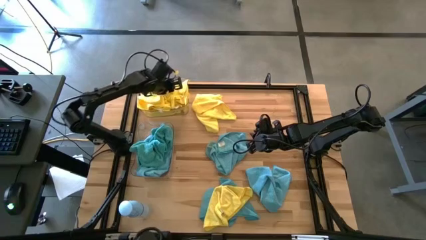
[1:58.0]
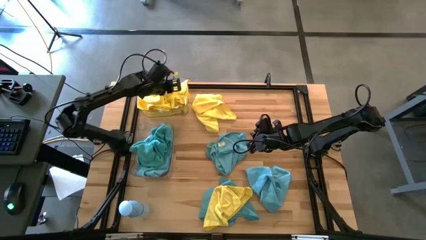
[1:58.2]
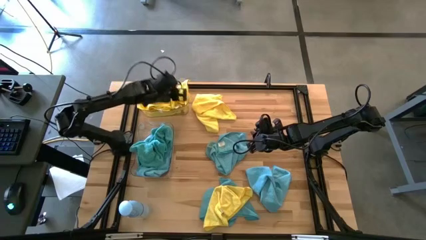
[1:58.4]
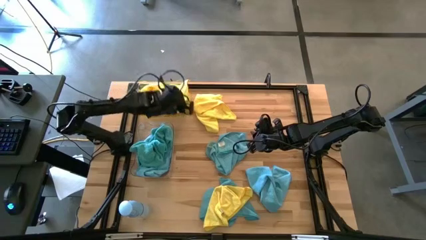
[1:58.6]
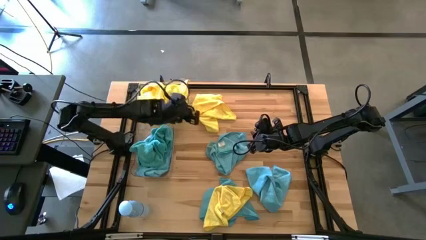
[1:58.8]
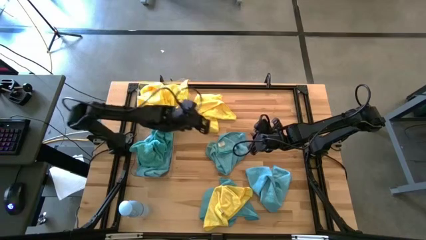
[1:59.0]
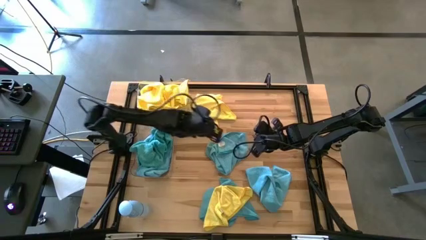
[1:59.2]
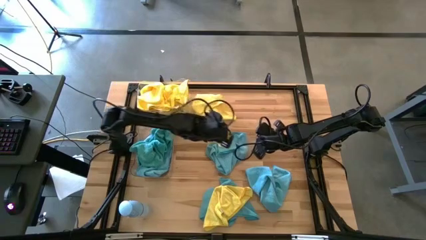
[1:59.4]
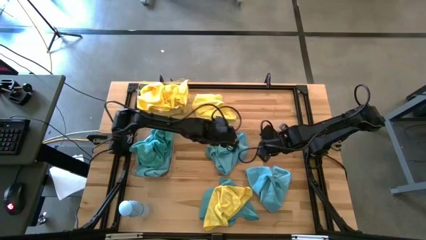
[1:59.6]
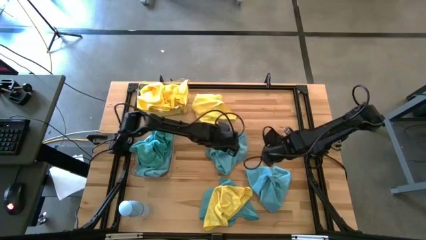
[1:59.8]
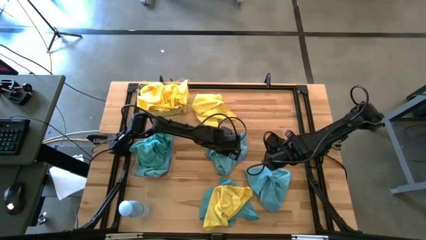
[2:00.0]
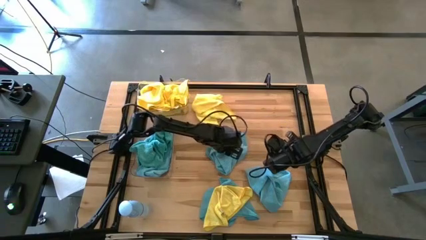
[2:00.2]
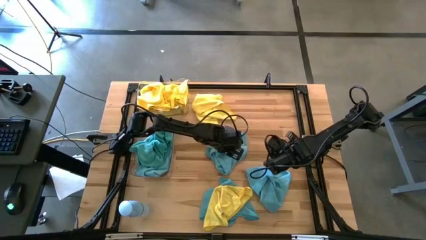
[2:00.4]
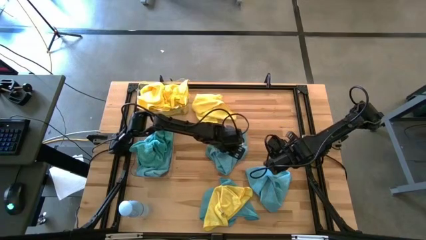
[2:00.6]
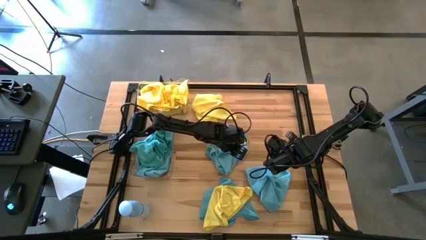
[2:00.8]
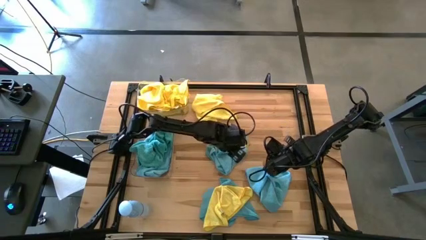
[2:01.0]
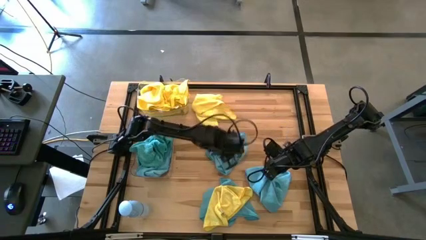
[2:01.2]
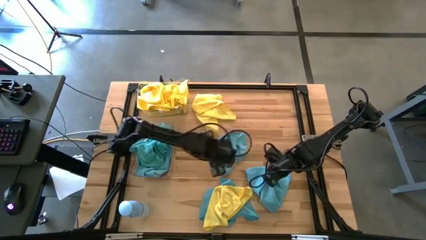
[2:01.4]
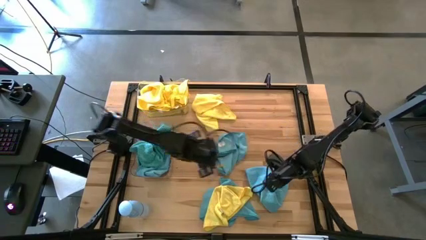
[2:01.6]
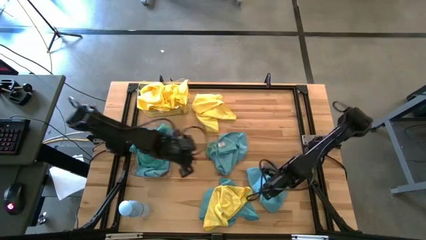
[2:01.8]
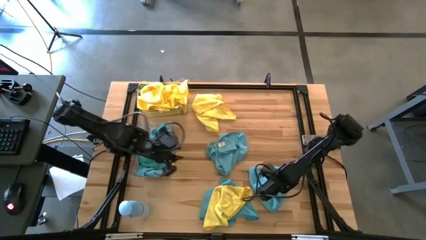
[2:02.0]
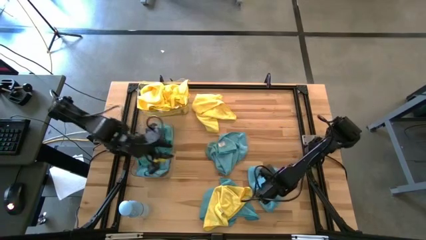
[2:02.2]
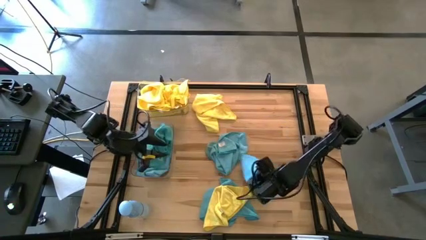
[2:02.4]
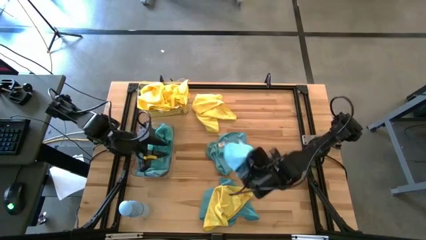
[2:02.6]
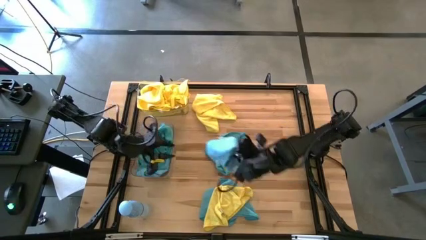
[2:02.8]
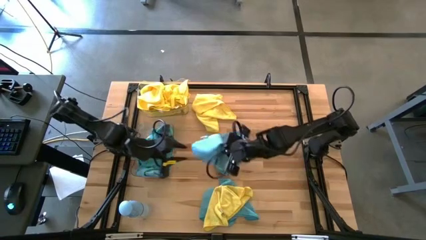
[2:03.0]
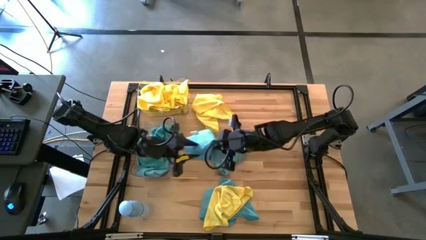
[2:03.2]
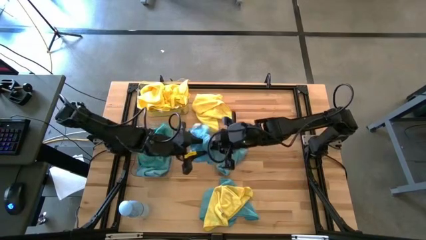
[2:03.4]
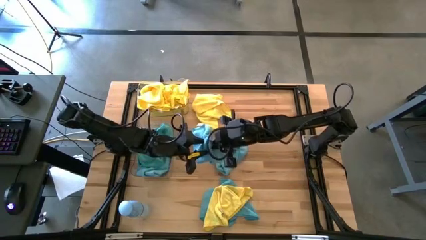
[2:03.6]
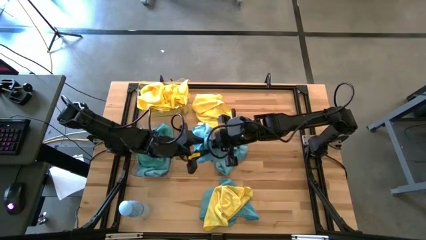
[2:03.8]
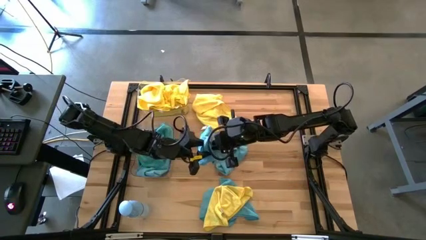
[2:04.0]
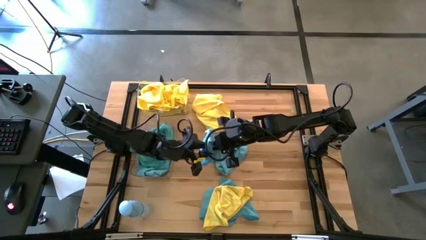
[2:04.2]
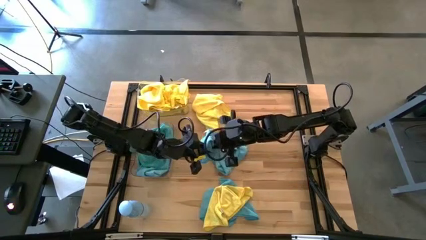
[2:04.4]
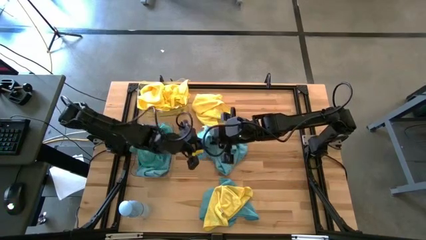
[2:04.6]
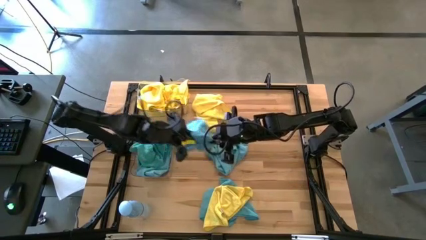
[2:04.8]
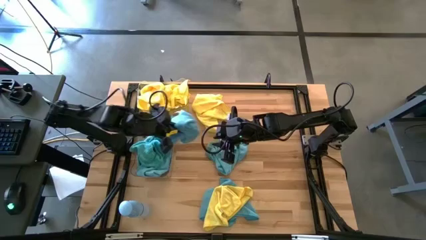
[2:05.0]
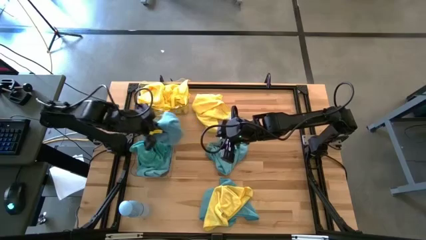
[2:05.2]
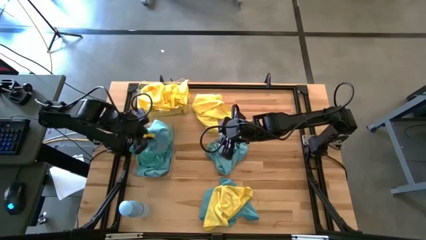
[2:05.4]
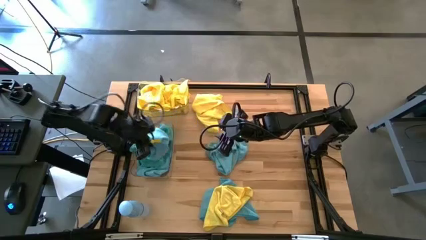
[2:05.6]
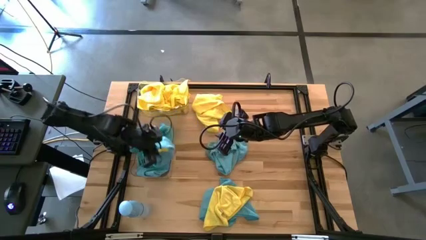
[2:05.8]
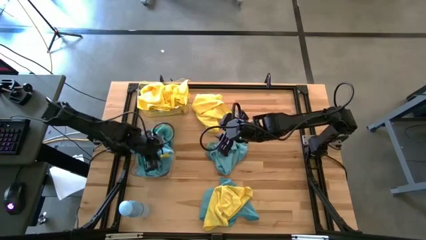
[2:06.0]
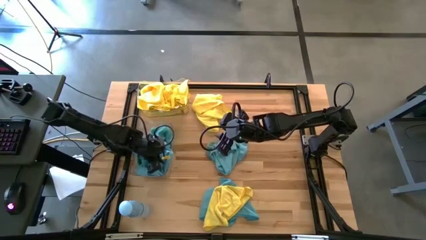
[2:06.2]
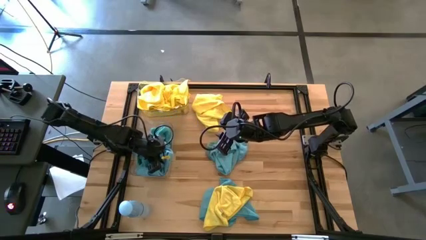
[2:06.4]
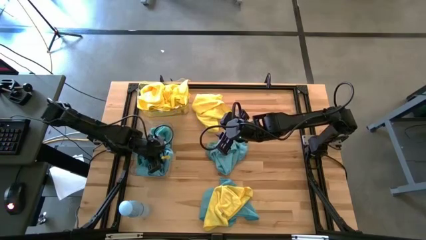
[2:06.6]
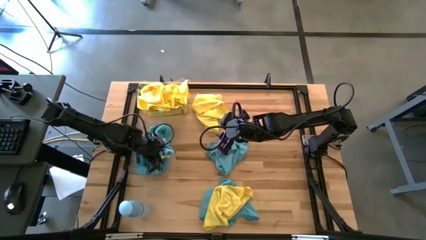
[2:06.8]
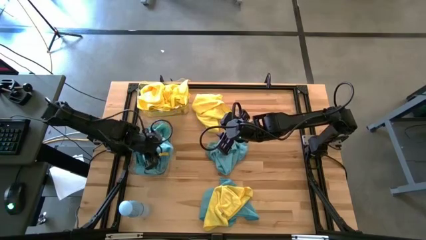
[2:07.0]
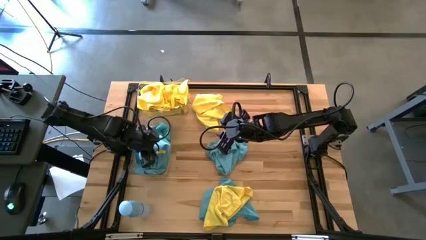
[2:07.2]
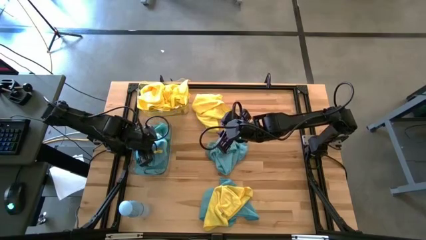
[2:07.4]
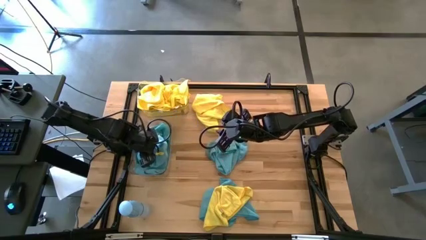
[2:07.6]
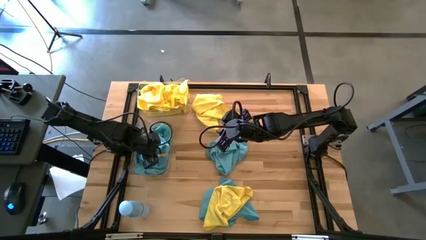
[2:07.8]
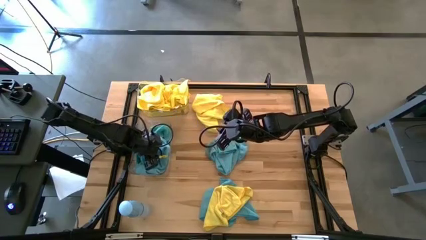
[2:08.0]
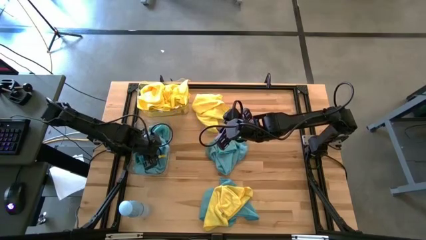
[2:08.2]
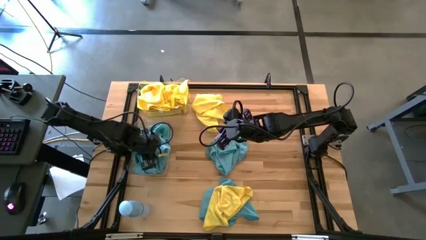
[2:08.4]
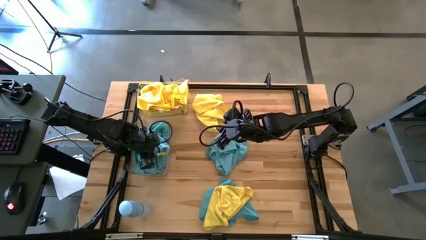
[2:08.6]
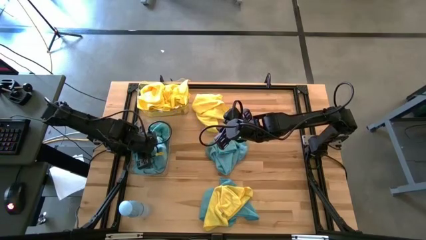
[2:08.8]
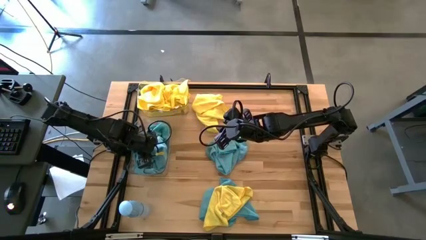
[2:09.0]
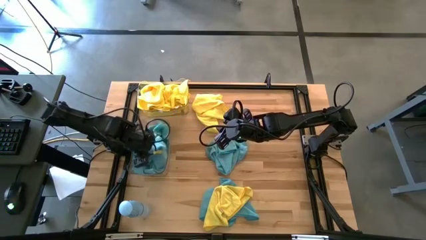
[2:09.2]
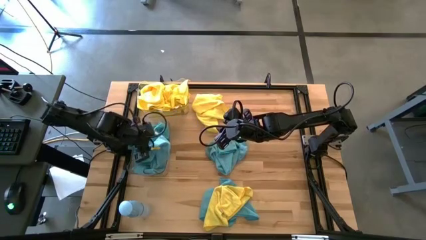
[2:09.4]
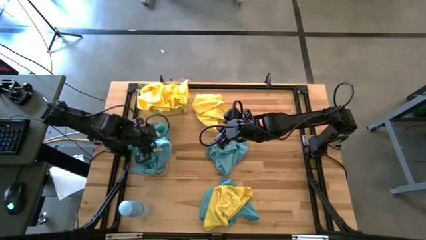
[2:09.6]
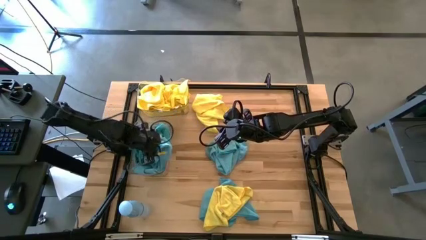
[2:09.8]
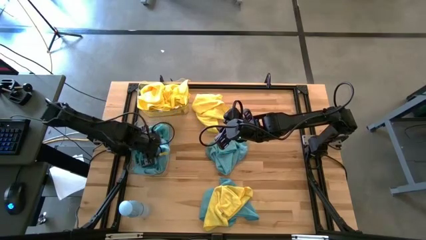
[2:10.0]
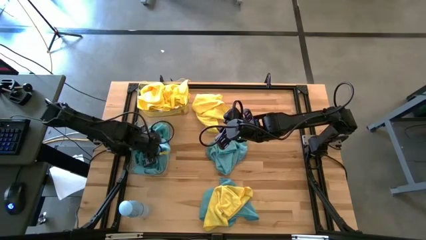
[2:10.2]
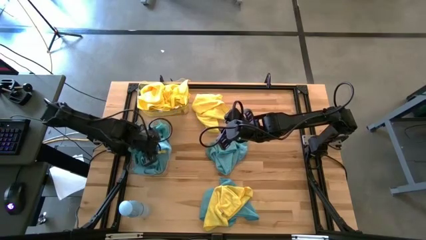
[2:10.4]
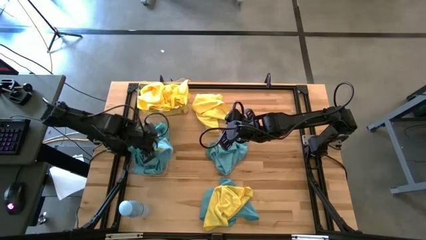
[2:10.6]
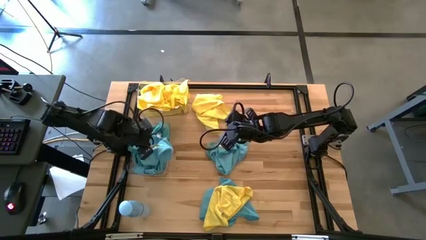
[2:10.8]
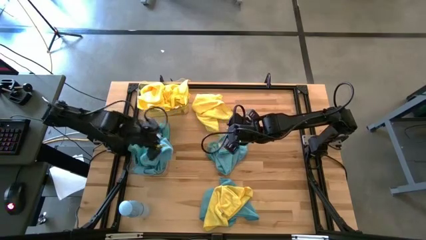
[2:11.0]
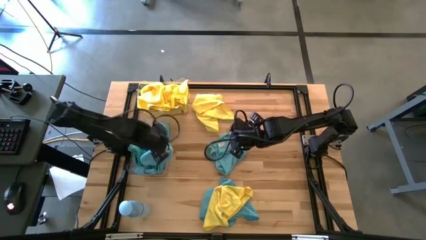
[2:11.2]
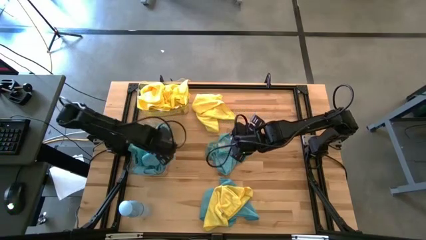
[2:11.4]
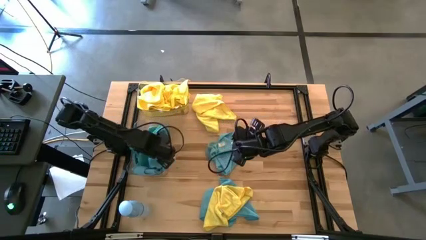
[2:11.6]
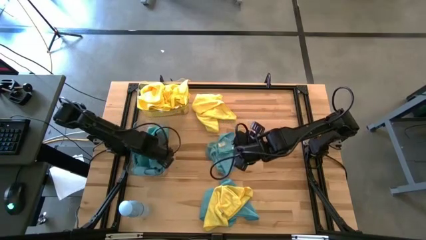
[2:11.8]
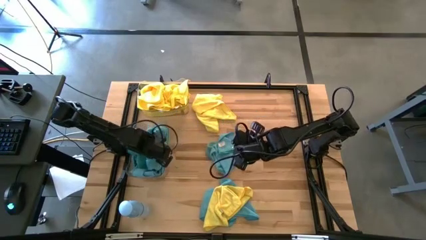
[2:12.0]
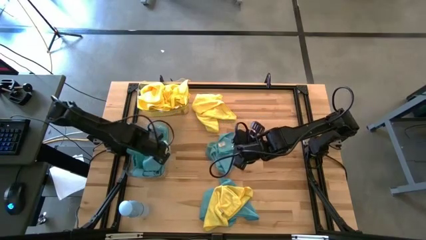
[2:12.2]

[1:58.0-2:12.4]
Task: Sort microfiber towel by color & place in baskets
Put the blue microfiber cloth into the bottom transparent bin
